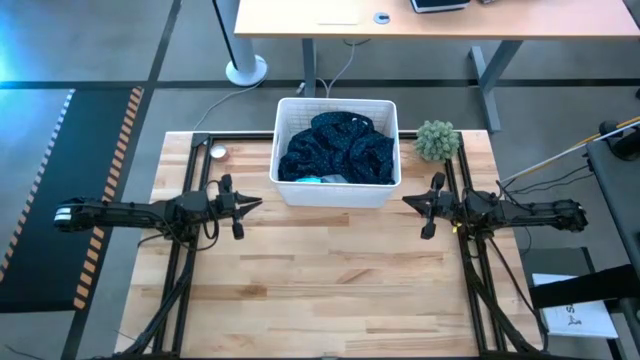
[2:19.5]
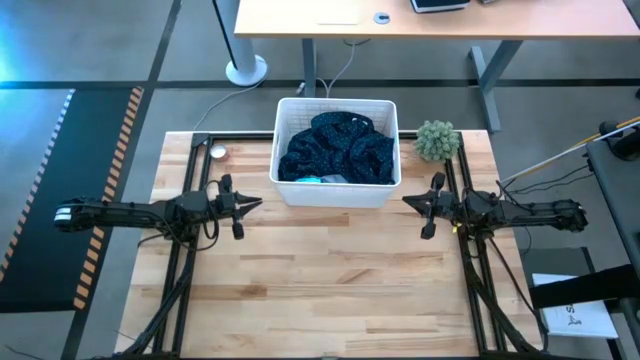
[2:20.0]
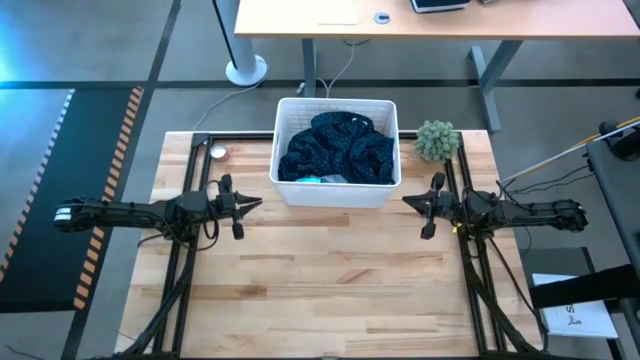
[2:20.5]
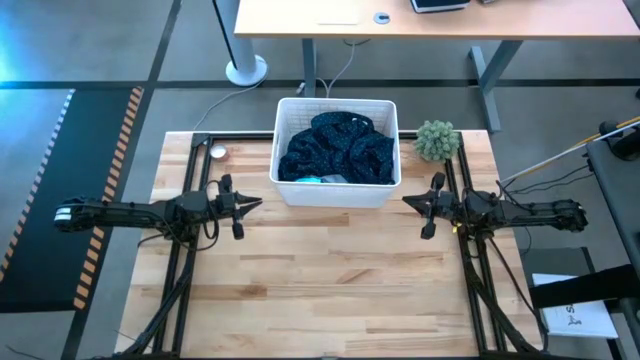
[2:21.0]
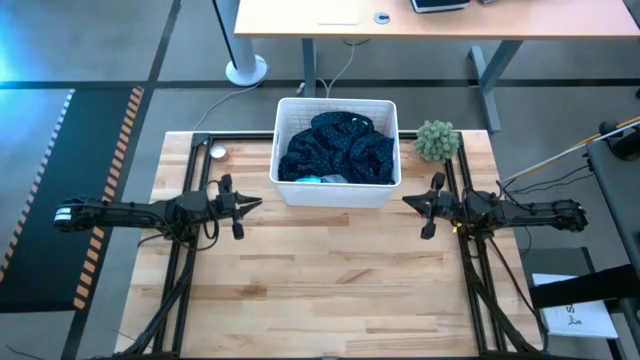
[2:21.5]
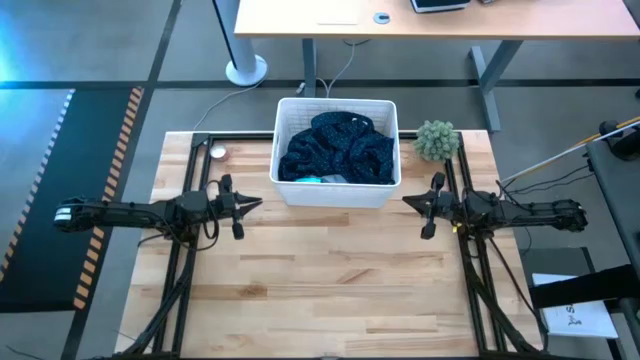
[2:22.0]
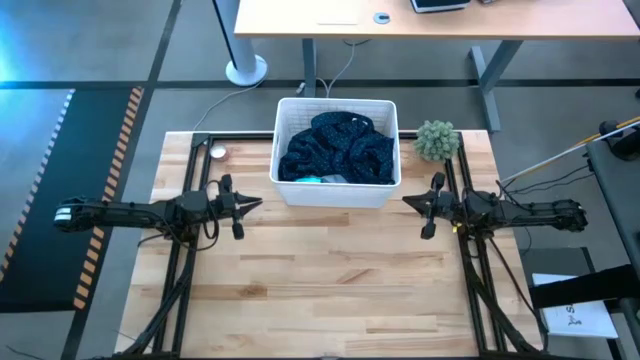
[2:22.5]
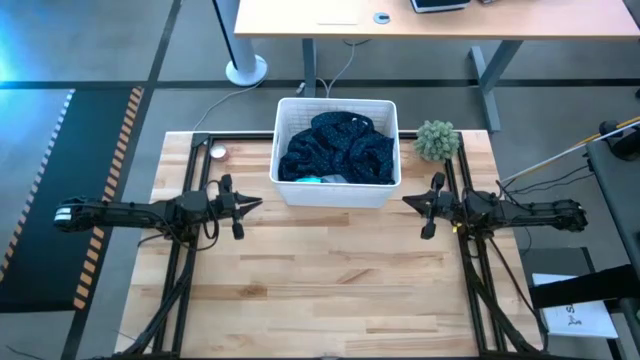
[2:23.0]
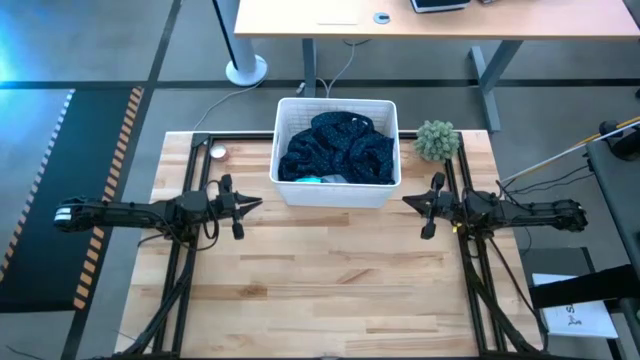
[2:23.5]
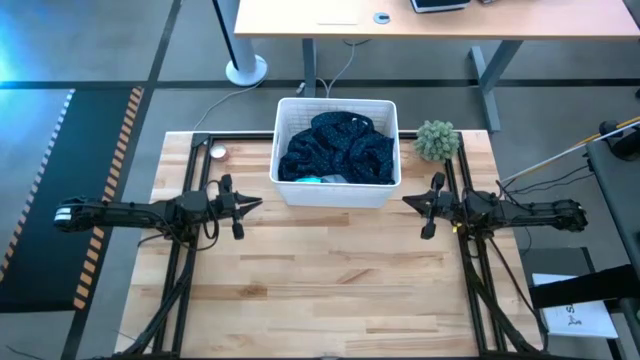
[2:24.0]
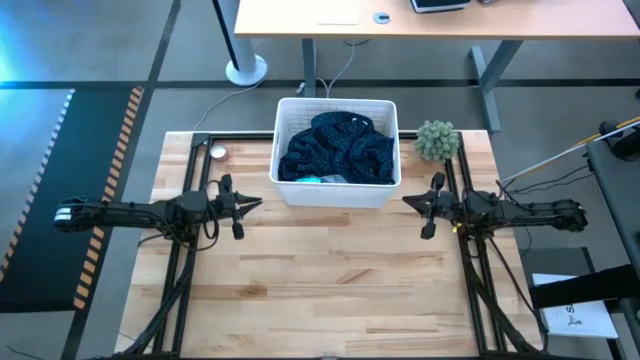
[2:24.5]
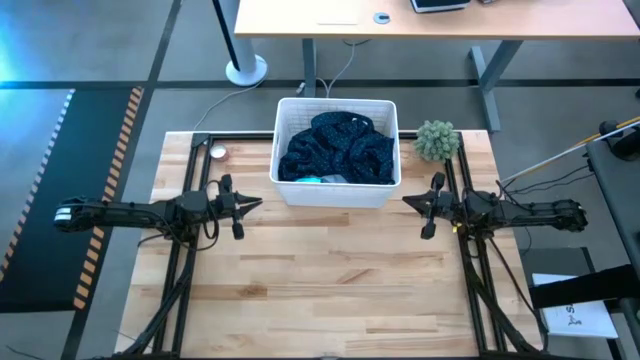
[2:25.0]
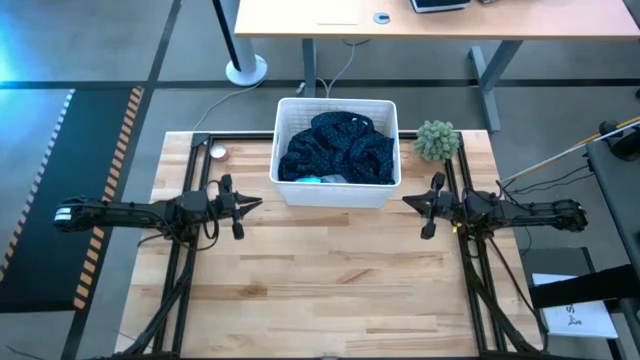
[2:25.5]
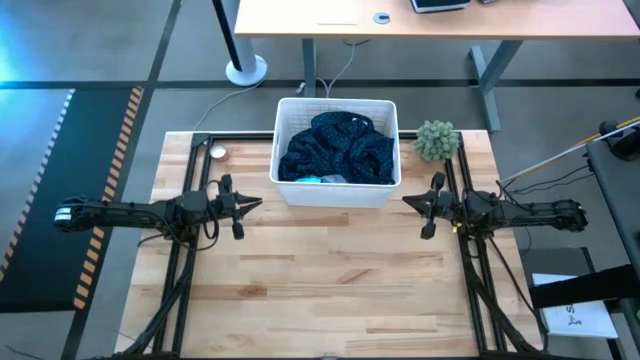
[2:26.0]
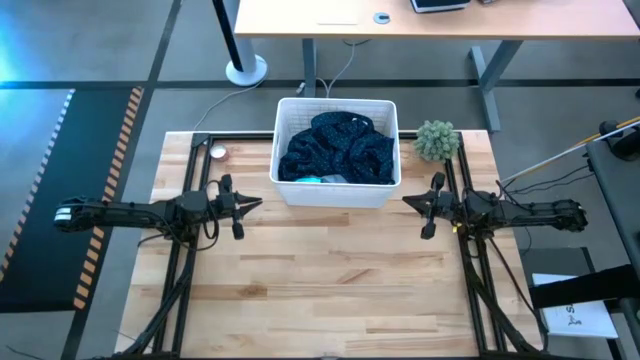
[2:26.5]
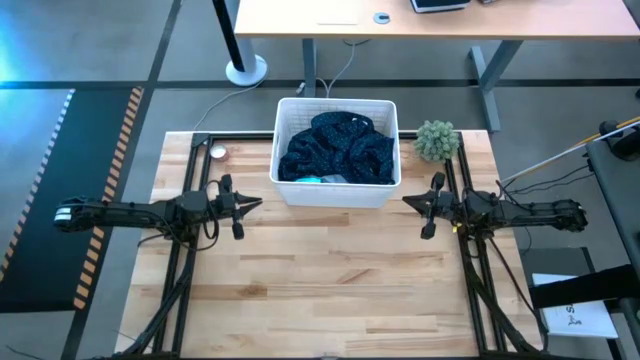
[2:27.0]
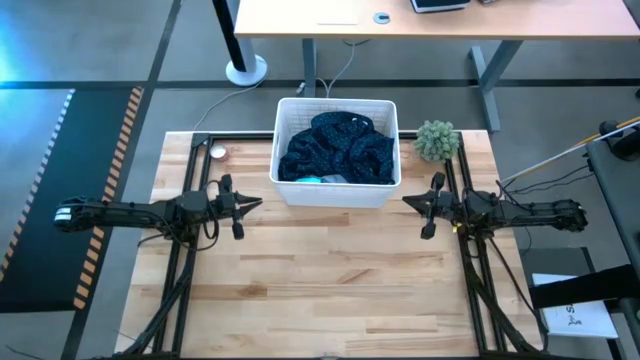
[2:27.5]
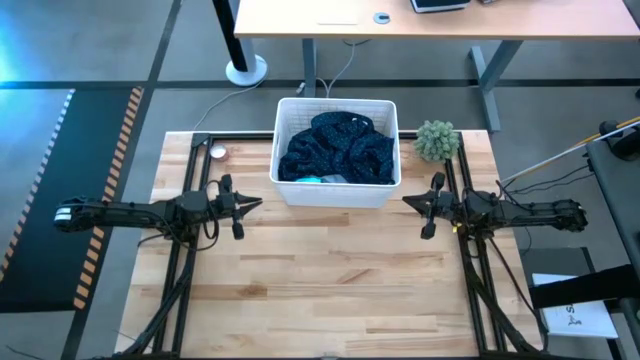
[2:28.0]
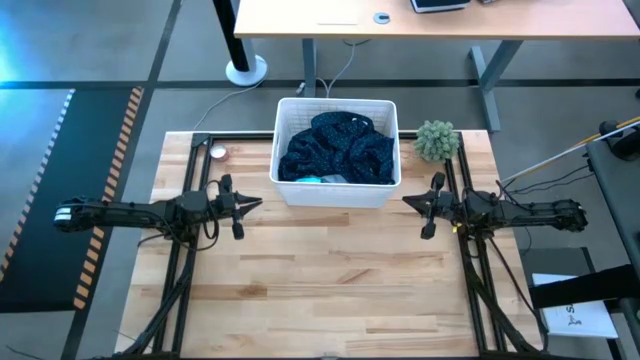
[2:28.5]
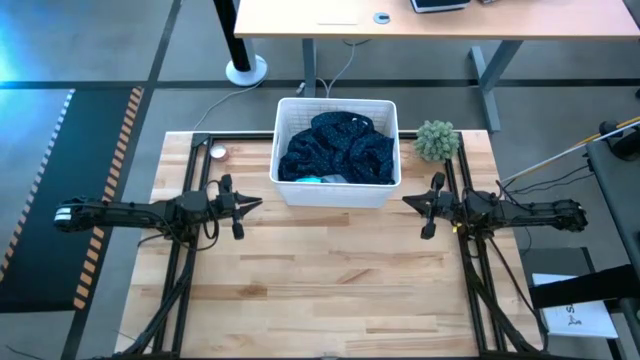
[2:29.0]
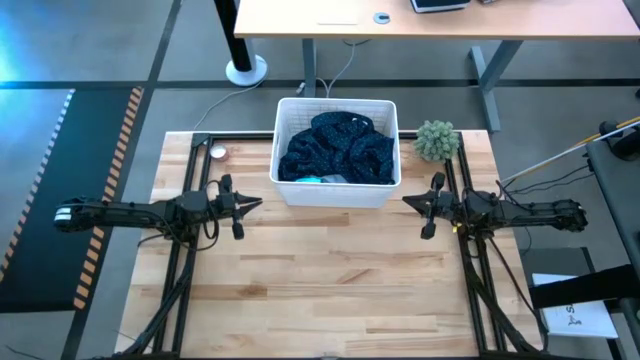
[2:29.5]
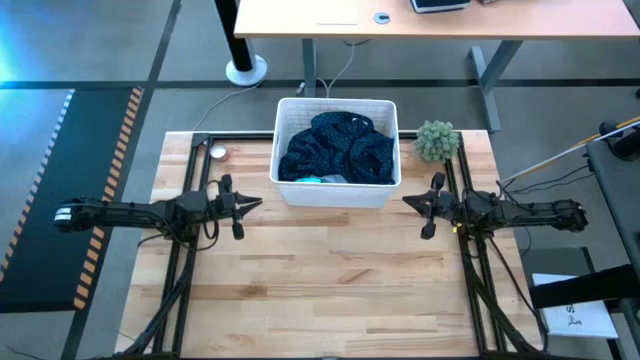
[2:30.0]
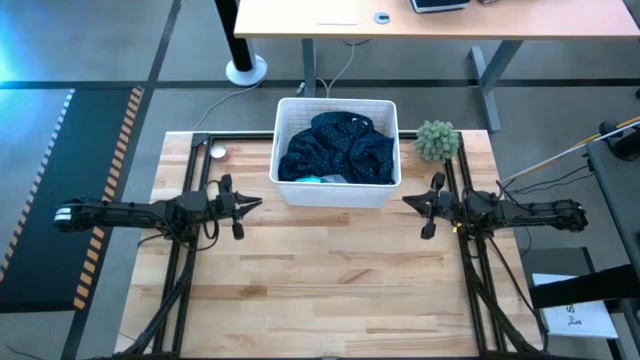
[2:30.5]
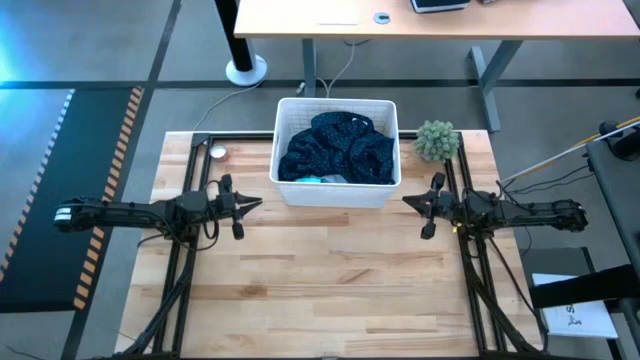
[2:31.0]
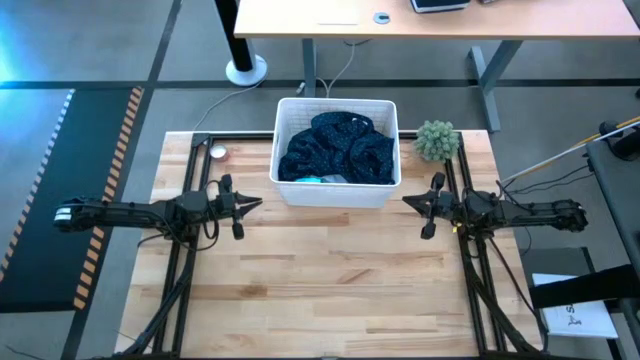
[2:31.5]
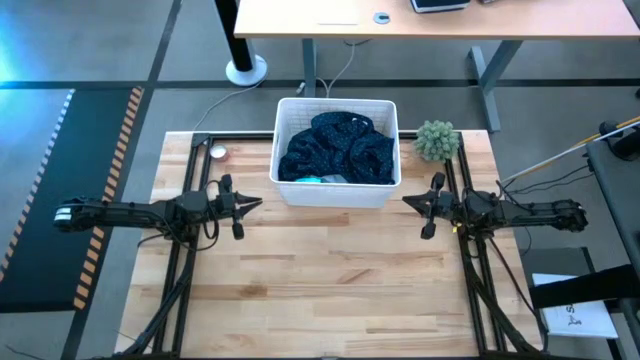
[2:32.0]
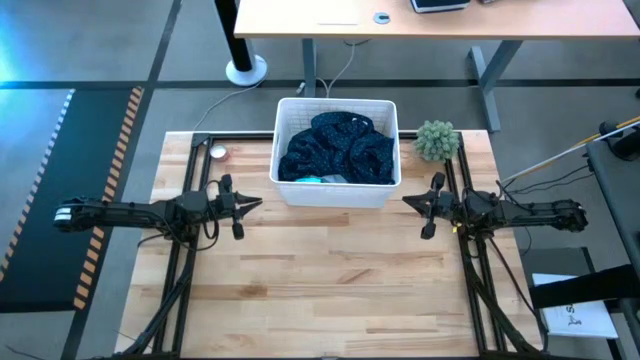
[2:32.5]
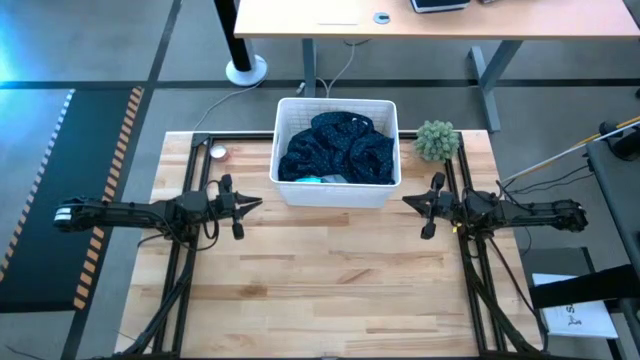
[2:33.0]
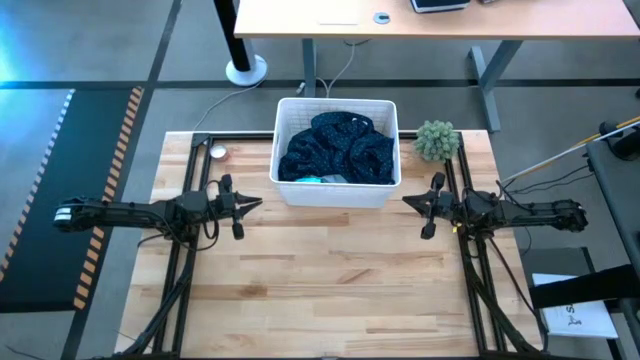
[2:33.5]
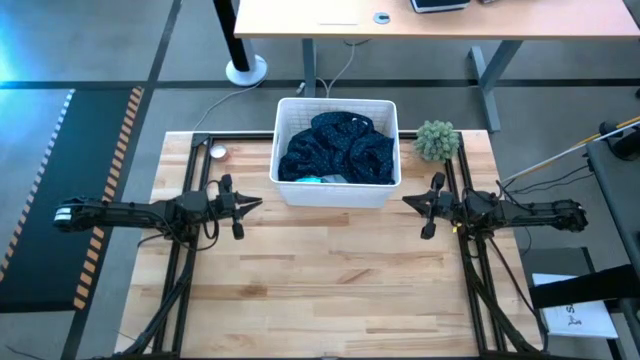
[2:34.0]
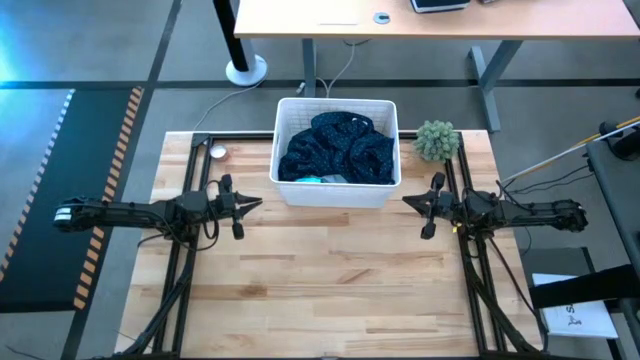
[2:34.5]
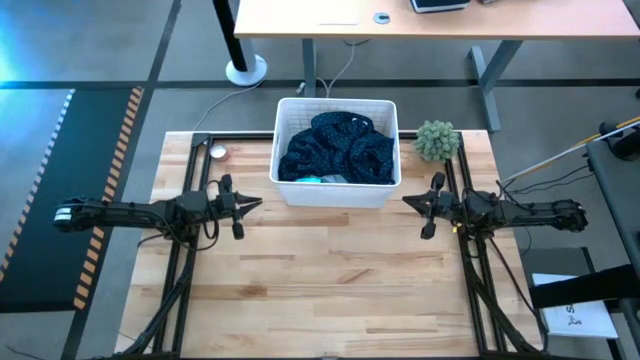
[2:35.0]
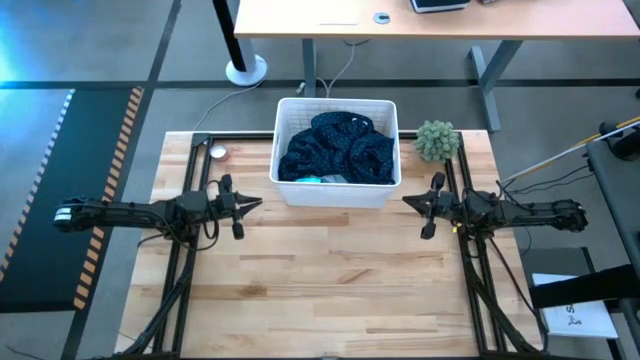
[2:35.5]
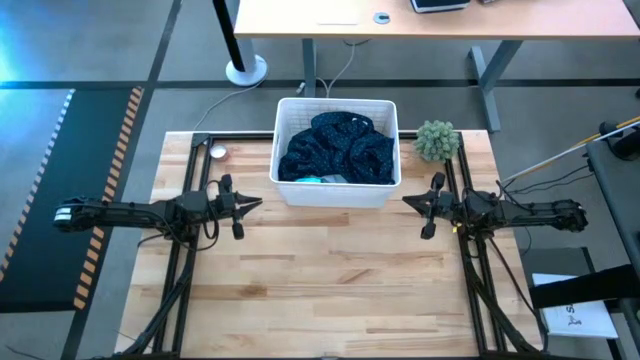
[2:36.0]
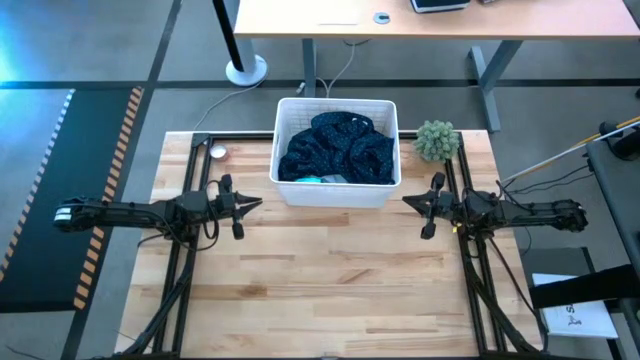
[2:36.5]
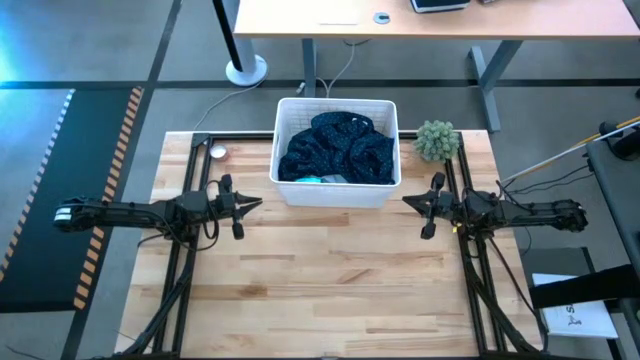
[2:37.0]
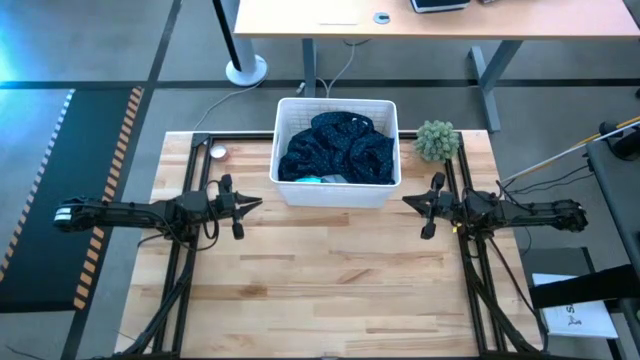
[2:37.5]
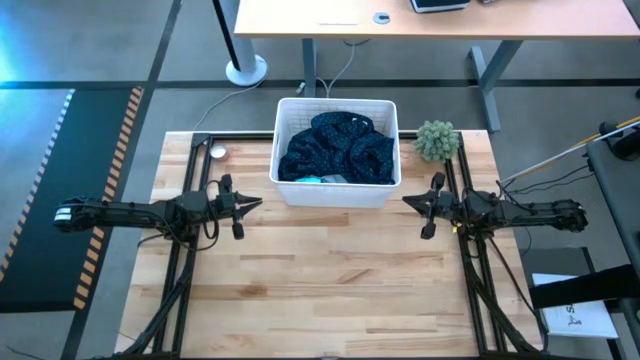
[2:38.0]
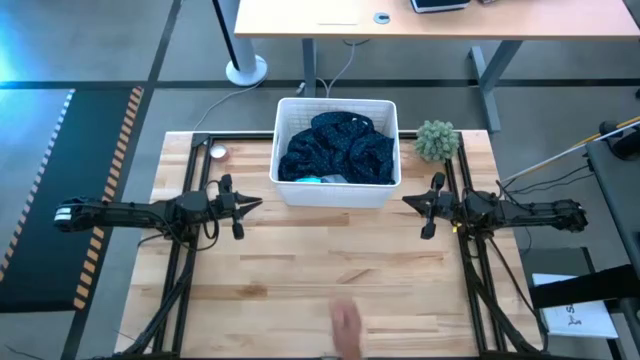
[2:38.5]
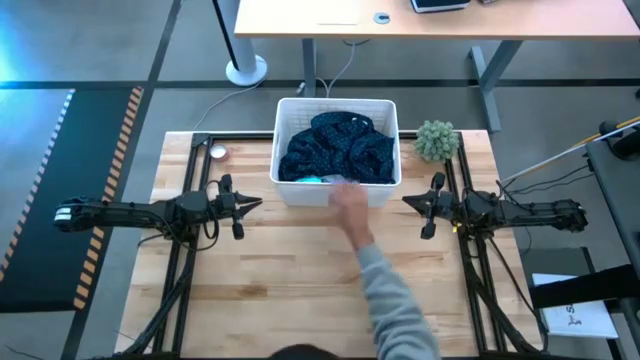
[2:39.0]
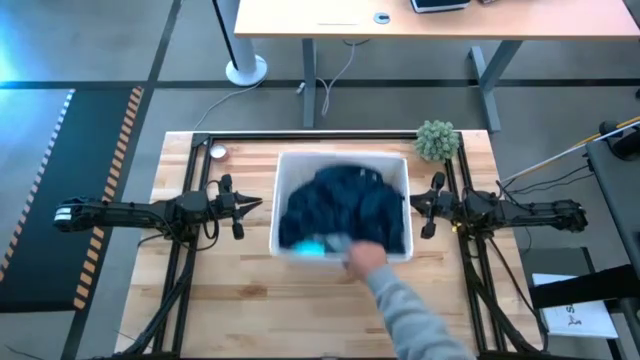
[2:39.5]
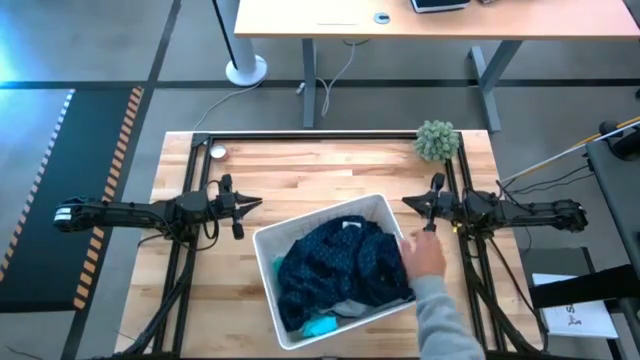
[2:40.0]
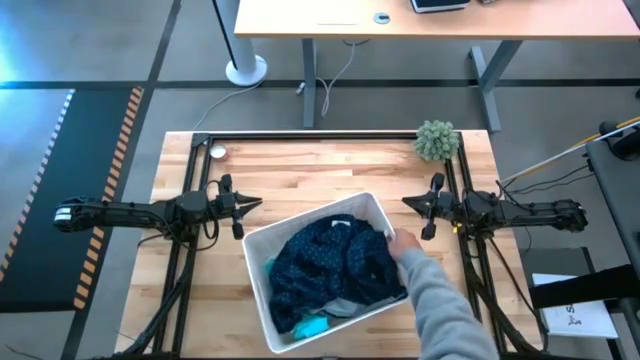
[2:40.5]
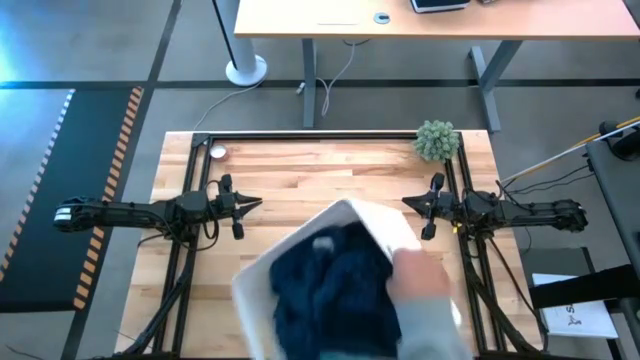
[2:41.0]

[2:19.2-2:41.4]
Task: Sort clothes
Return to Home Position
